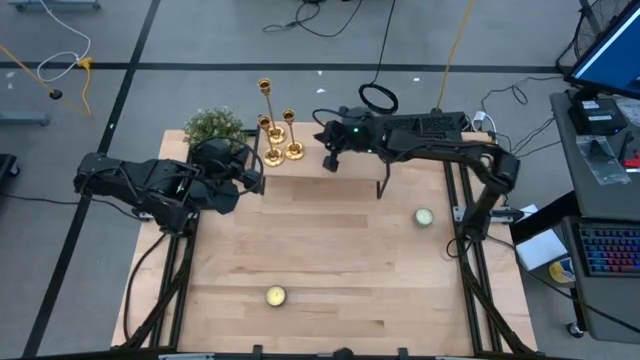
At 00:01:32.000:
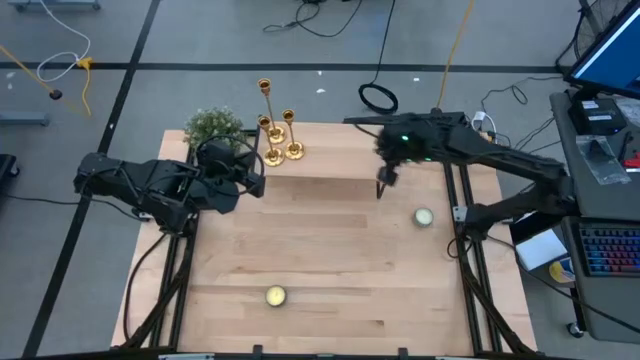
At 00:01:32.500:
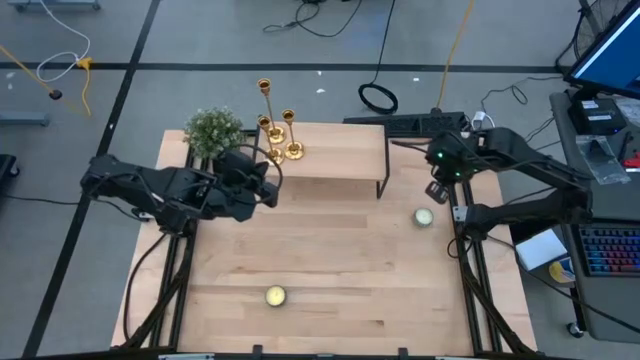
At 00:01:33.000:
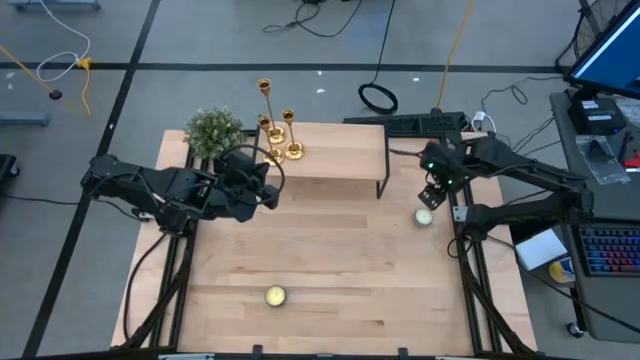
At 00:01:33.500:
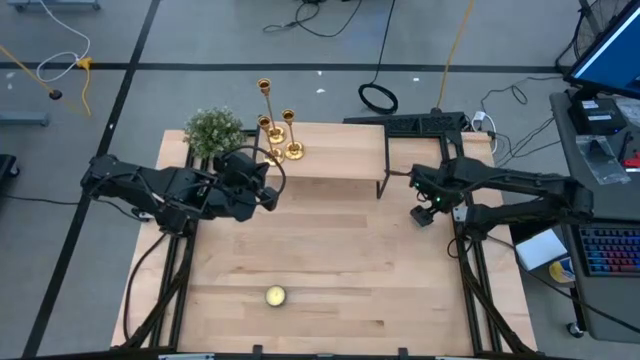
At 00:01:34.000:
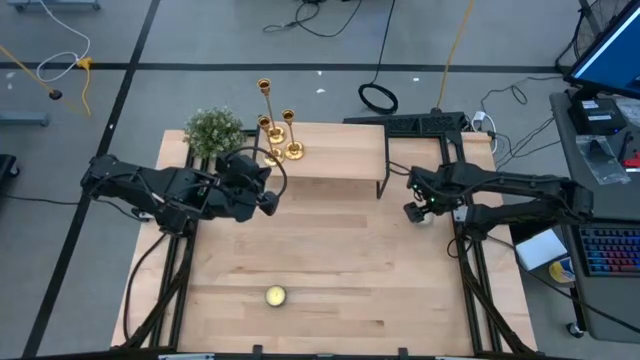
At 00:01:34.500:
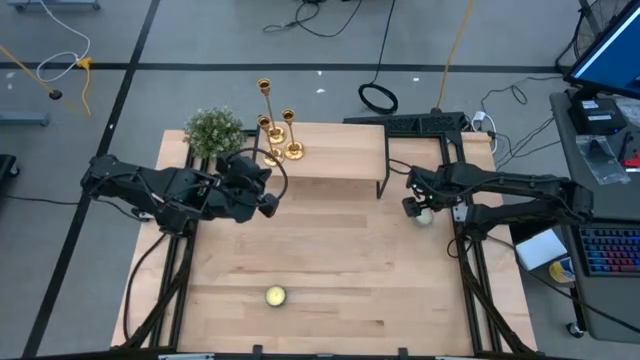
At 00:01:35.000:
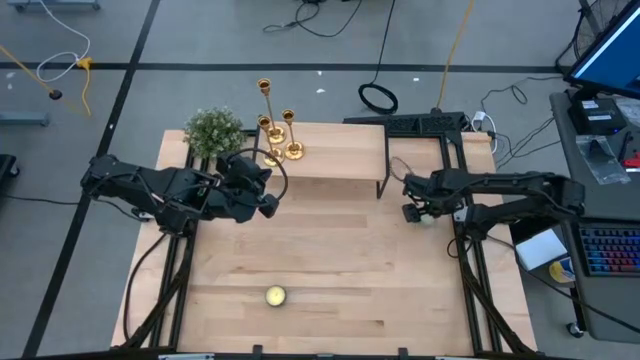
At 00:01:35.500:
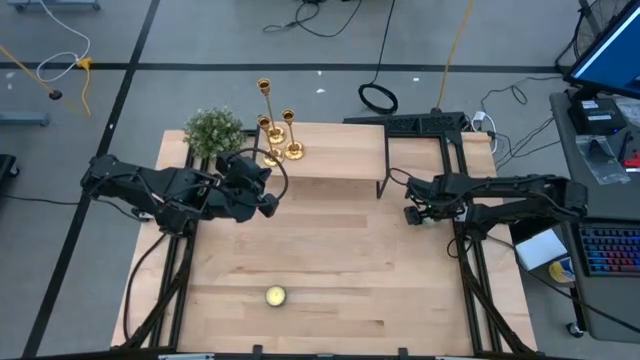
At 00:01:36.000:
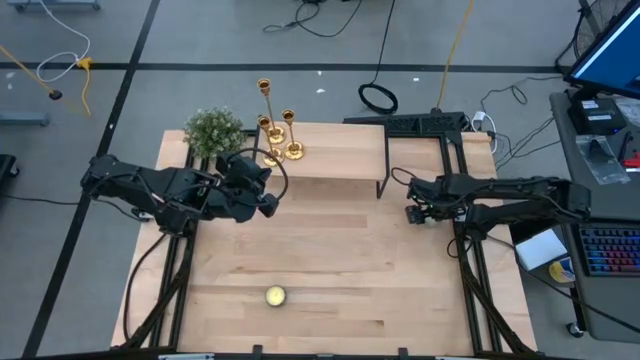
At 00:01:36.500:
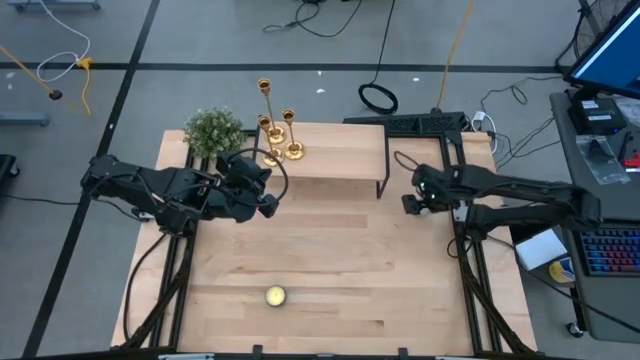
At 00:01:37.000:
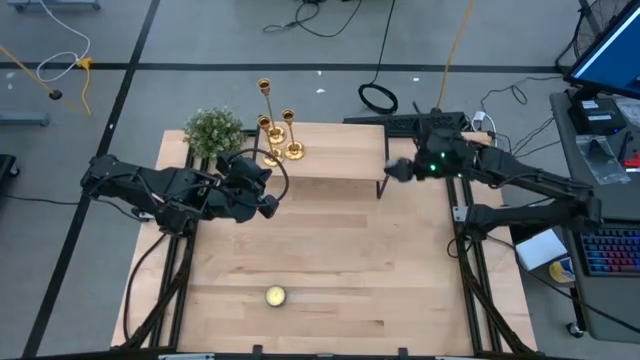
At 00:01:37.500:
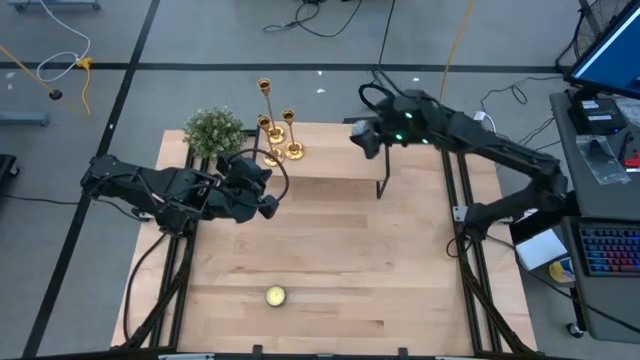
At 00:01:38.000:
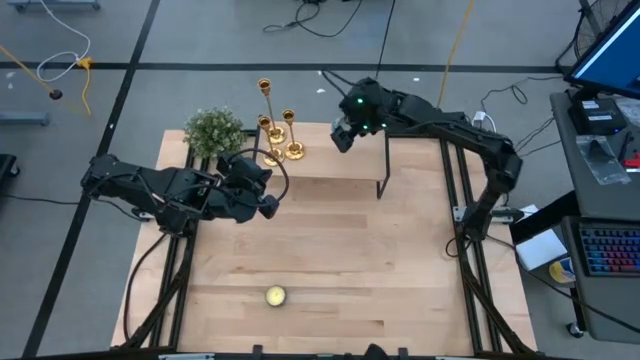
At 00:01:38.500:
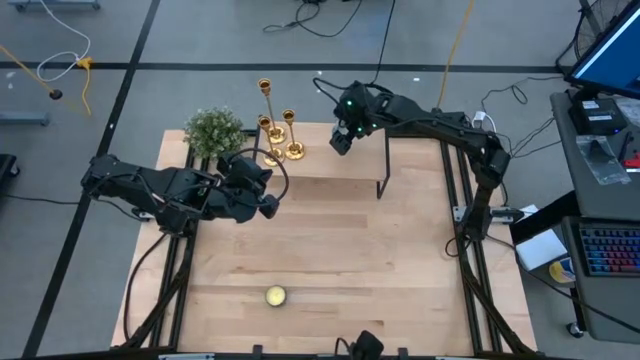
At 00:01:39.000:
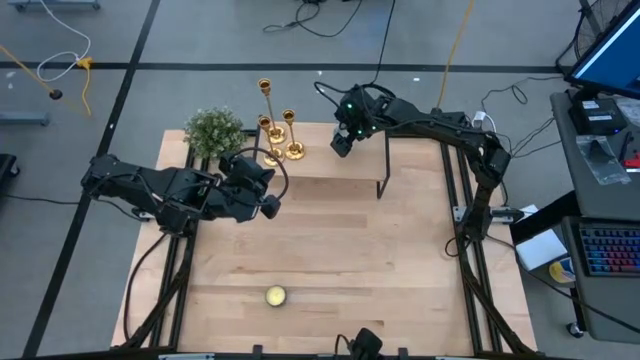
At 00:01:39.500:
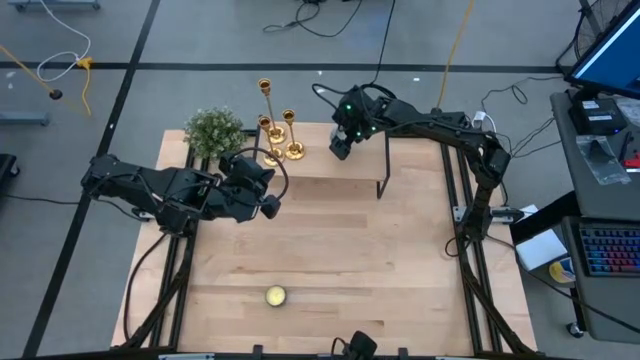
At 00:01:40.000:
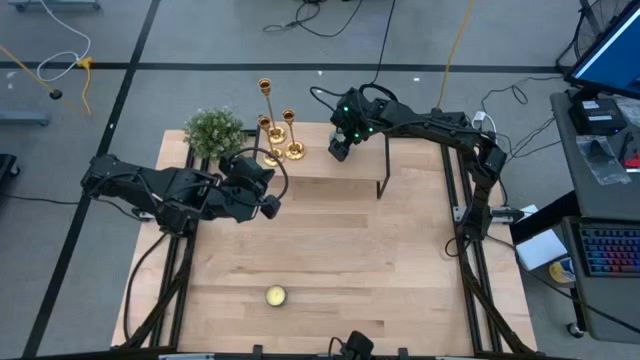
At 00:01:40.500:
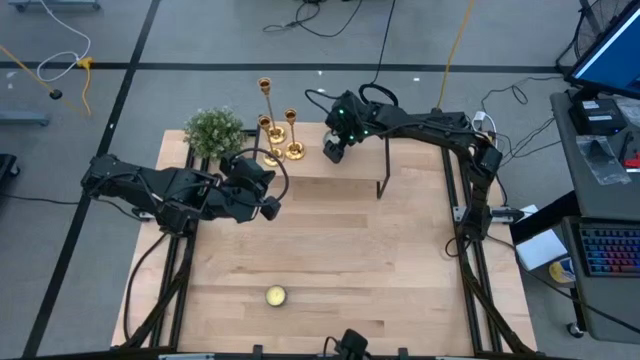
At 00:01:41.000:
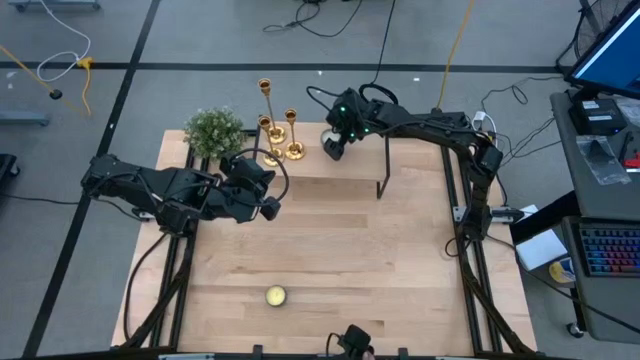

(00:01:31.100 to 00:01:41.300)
Task: Pick & Place candle stick holders
Put the blue scented candle on the shelf

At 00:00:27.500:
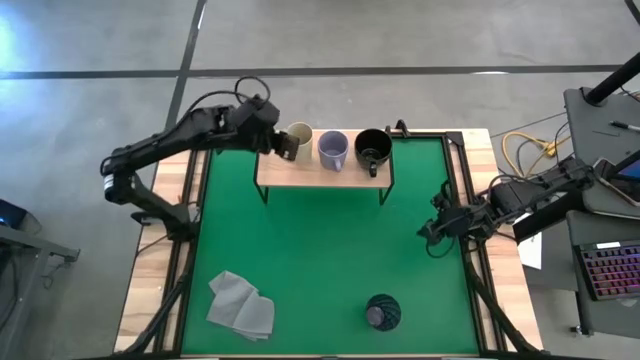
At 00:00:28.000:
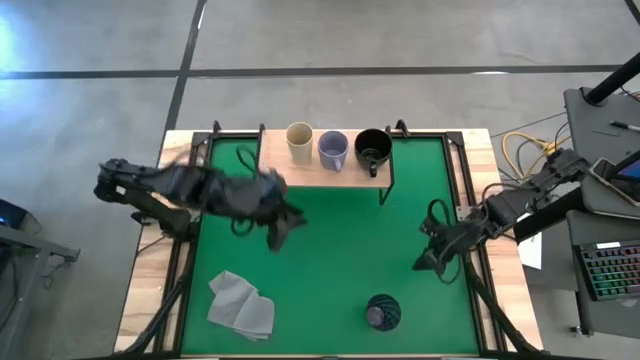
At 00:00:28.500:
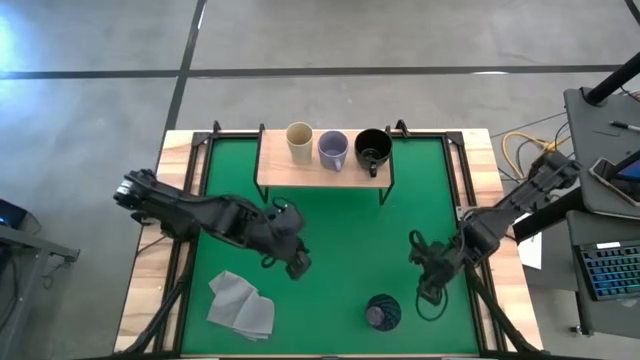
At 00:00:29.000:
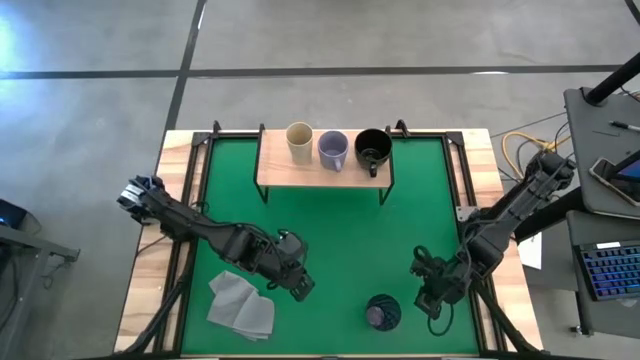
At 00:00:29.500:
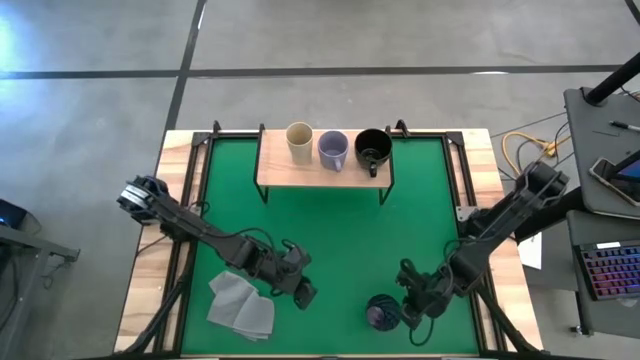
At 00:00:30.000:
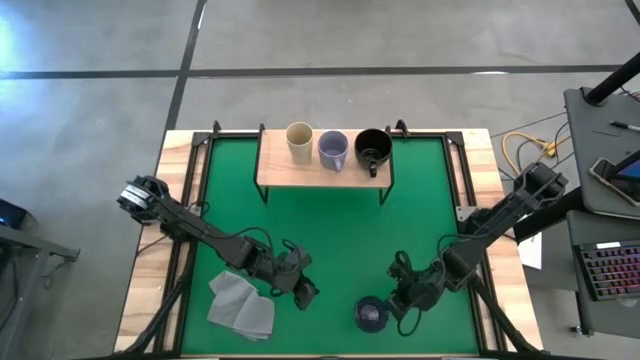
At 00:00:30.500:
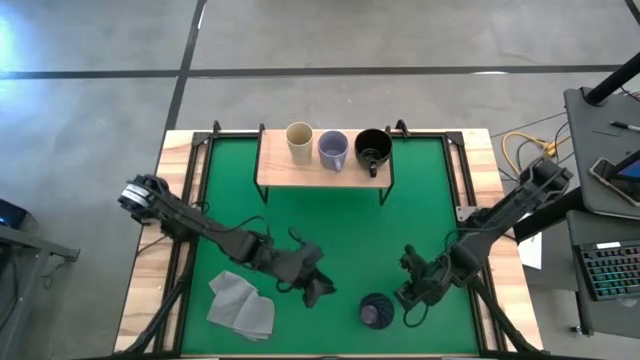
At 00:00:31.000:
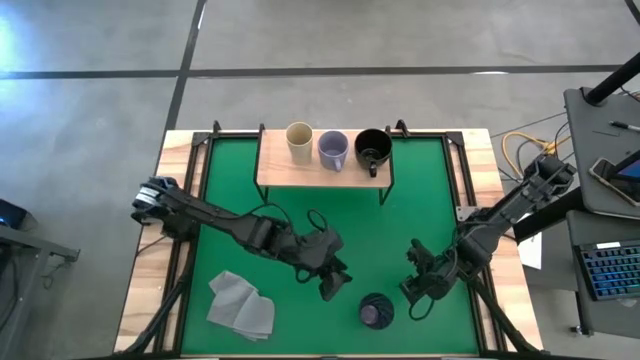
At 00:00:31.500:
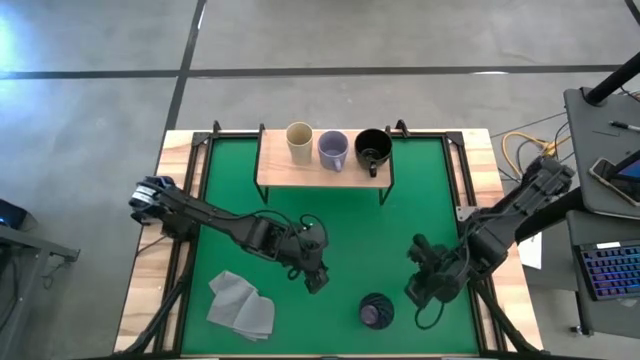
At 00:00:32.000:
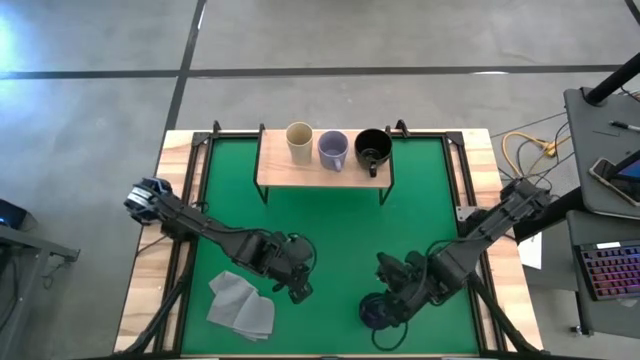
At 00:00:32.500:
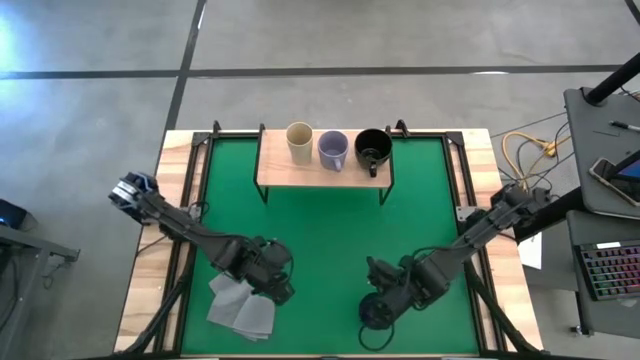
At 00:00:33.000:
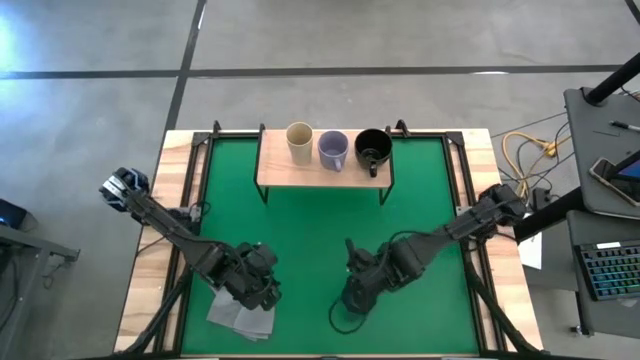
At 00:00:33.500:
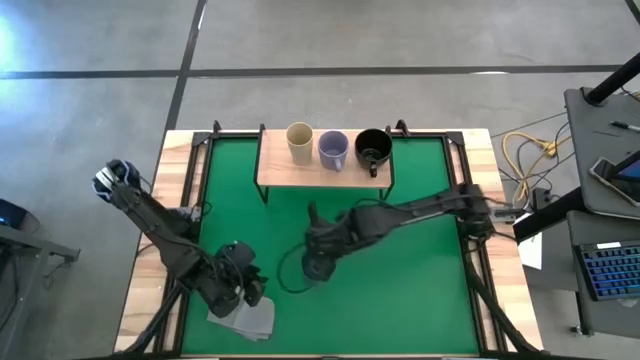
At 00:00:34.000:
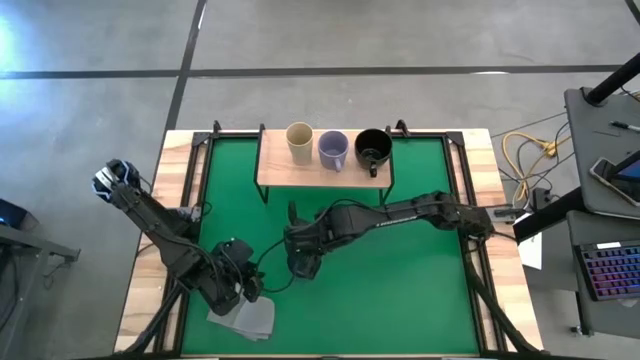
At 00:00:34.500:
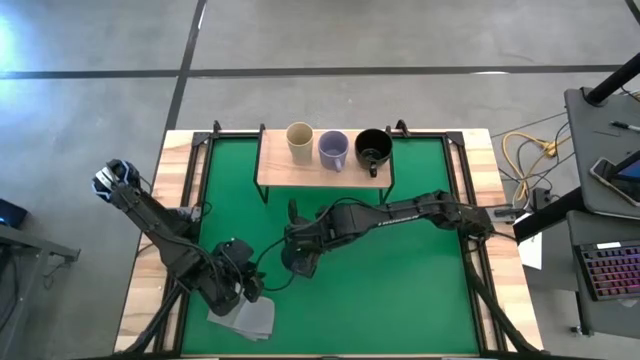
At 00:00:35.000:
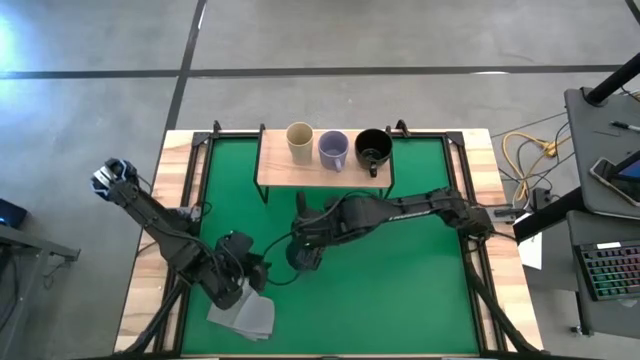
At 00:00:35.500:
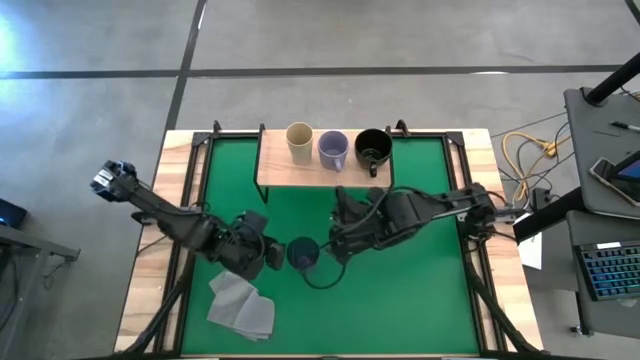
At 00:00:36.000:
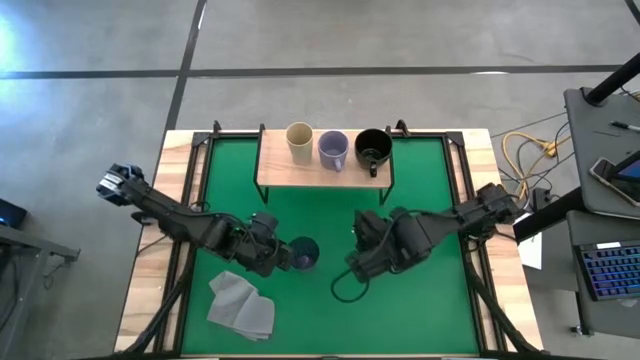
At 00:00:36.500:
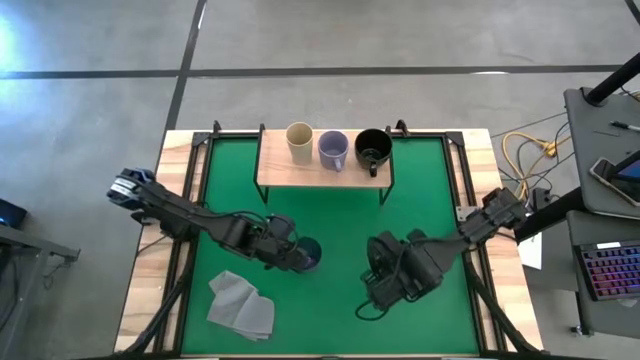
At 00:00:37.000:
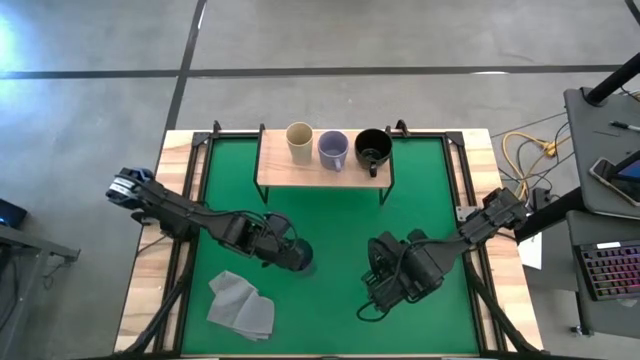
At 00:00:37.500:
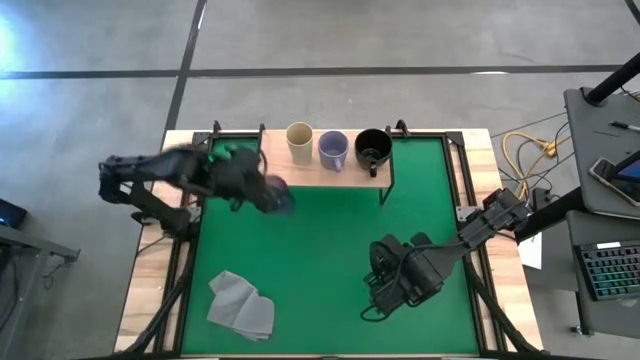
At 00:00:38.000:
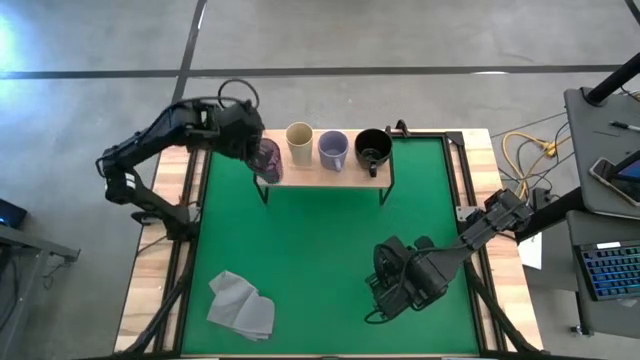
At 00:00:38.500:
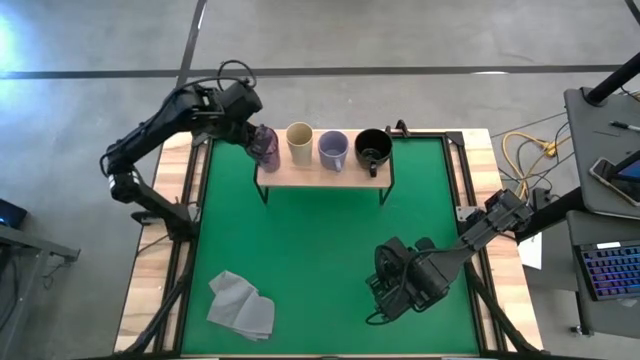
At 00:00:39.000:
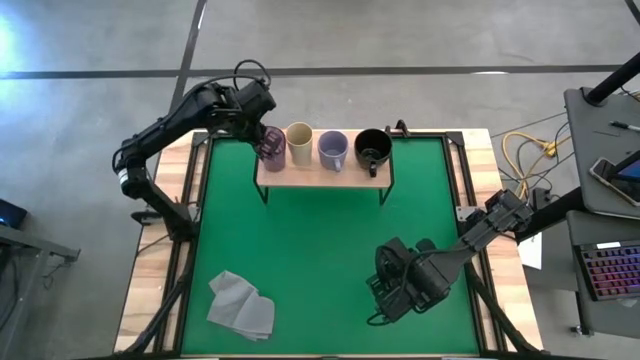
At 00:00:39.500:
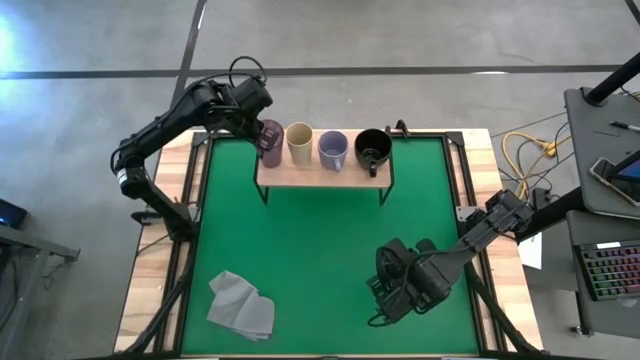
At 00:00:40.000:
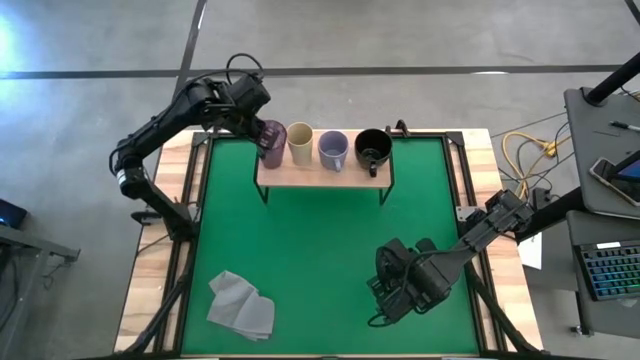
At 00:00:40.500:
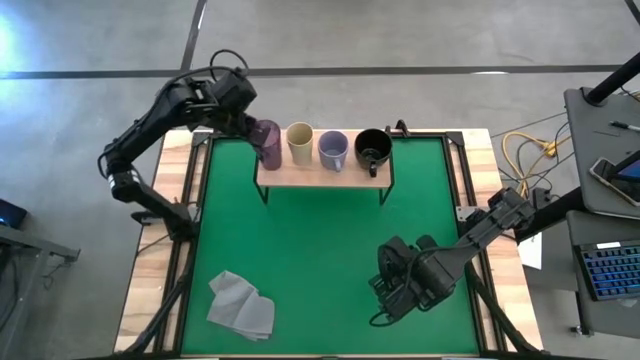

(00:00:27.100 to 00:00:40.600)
Task: Stack small to large cups/mugs on shelf
Put the violet glass on the shelf
